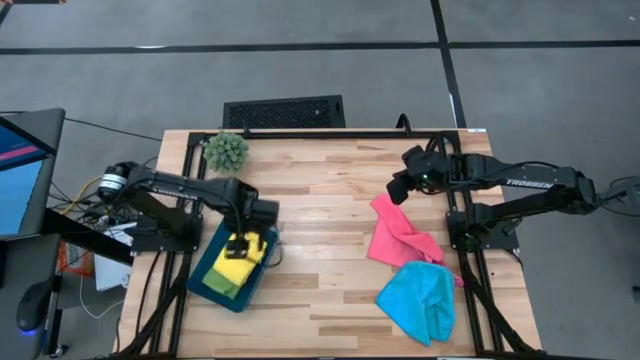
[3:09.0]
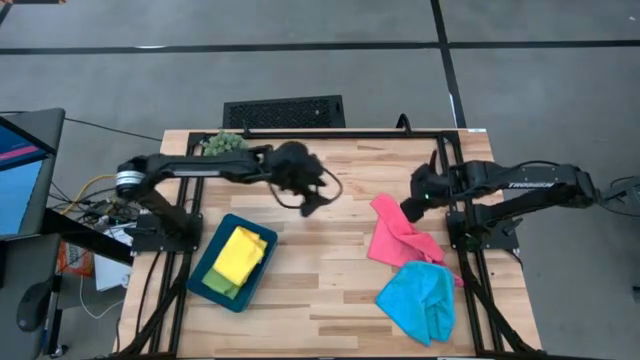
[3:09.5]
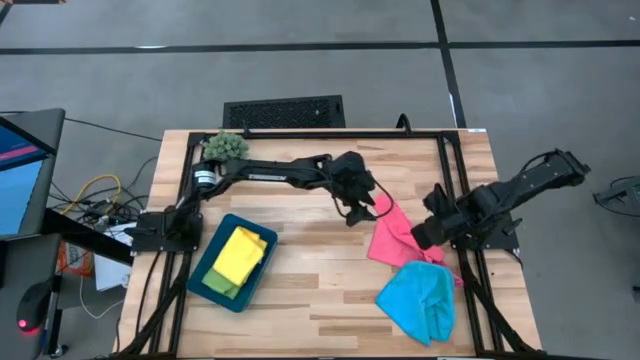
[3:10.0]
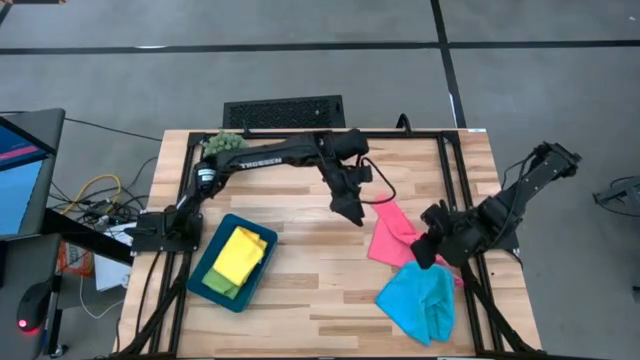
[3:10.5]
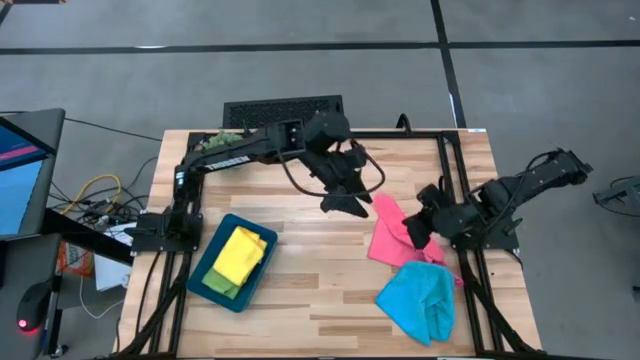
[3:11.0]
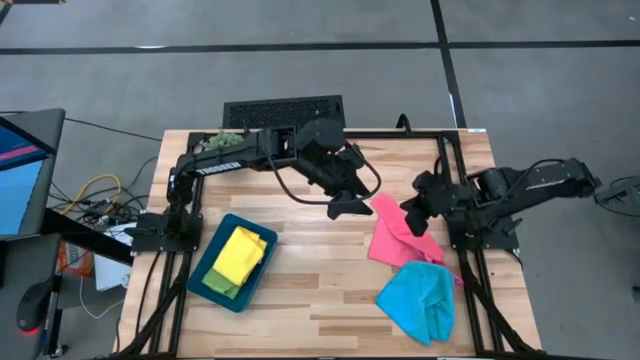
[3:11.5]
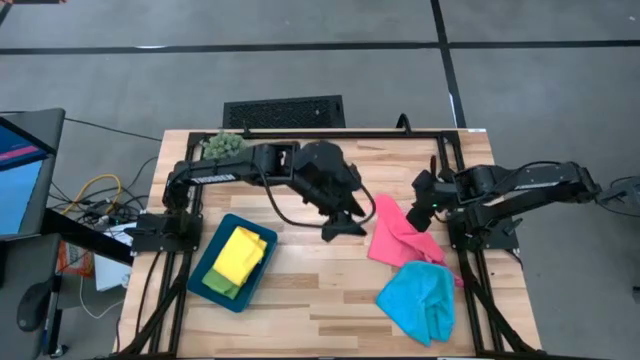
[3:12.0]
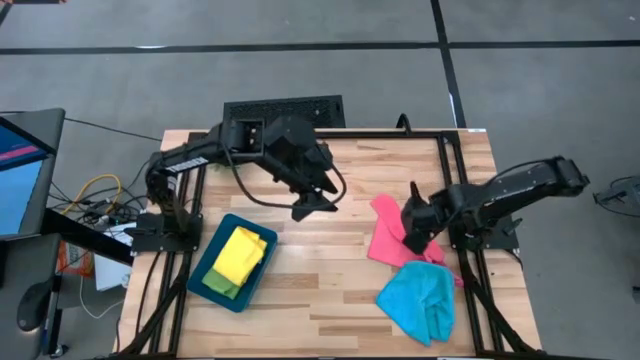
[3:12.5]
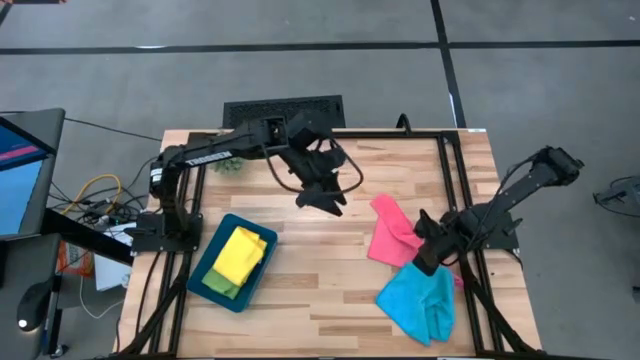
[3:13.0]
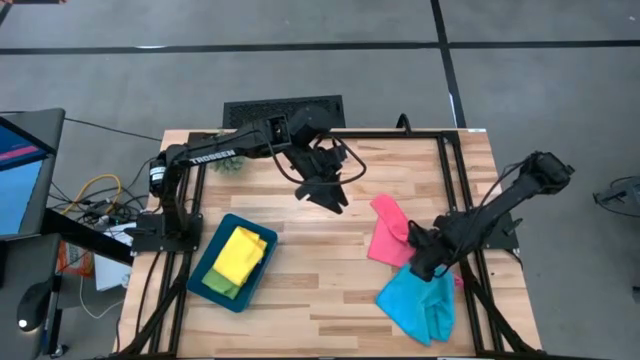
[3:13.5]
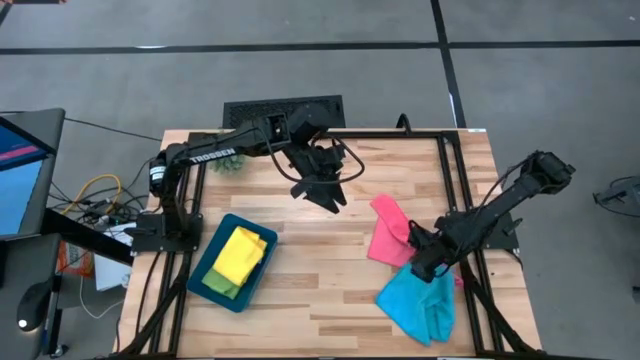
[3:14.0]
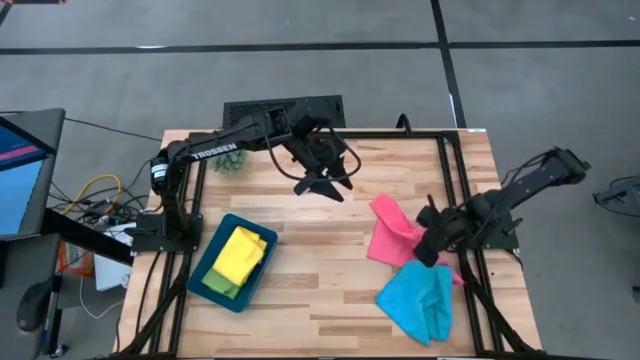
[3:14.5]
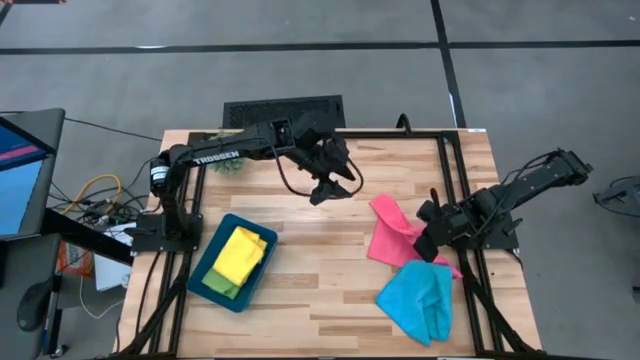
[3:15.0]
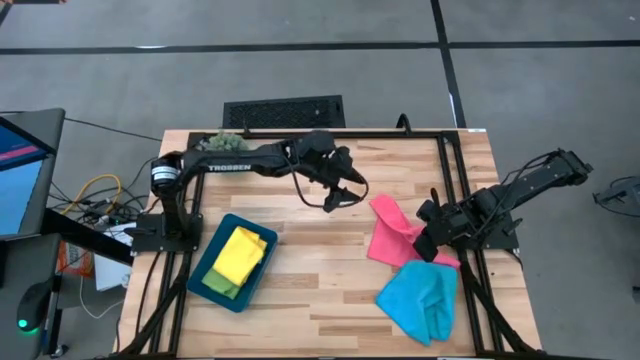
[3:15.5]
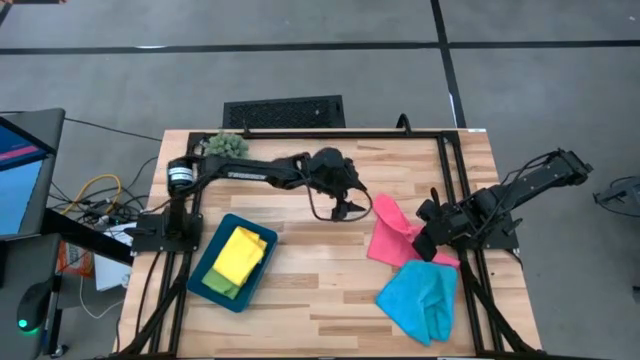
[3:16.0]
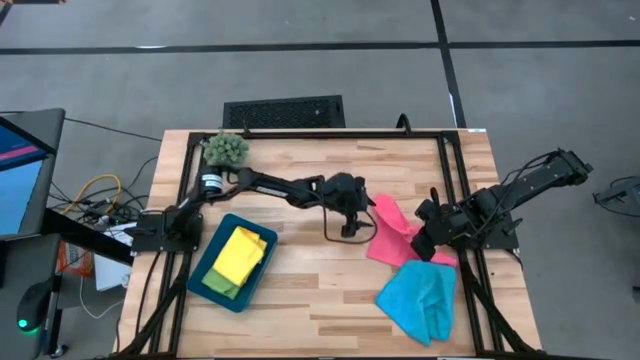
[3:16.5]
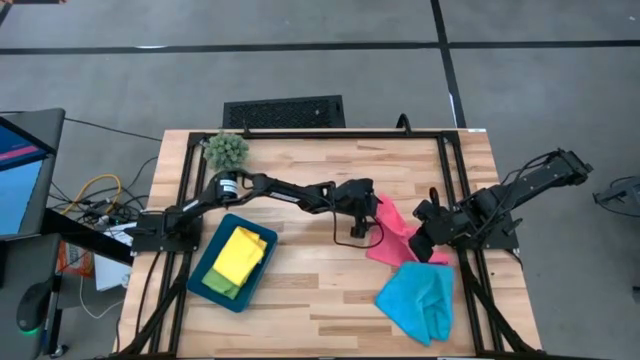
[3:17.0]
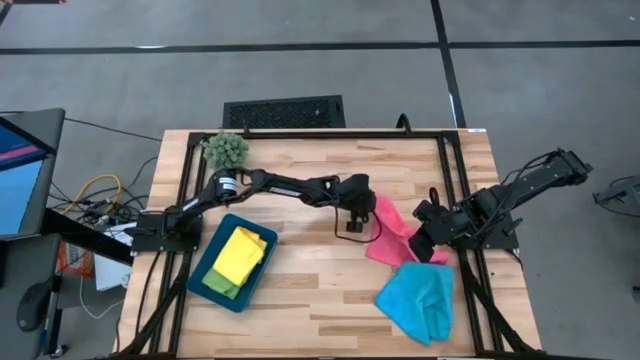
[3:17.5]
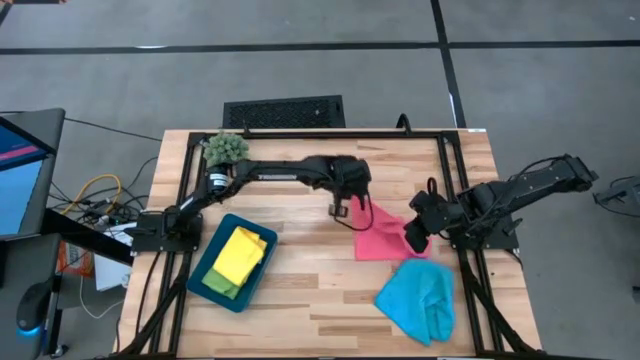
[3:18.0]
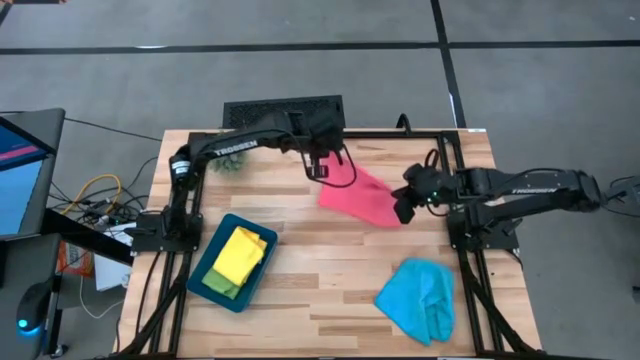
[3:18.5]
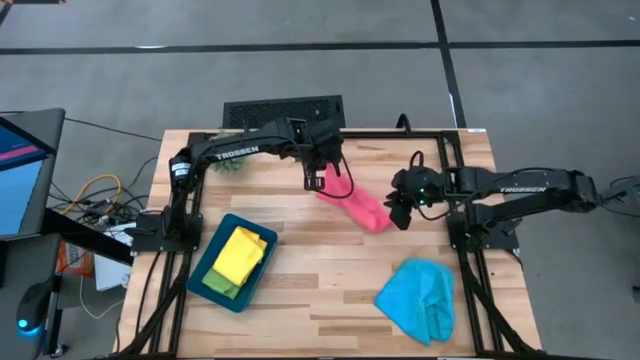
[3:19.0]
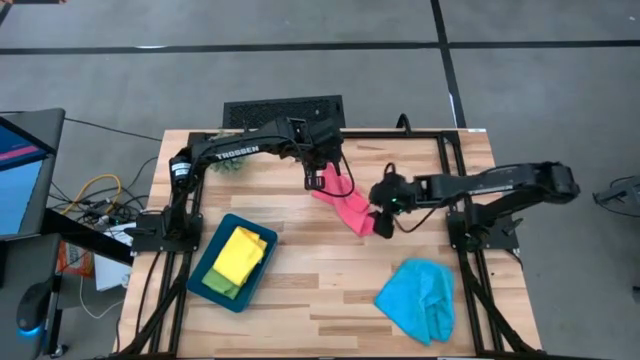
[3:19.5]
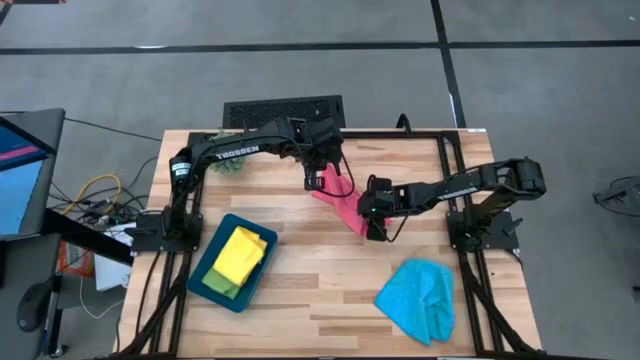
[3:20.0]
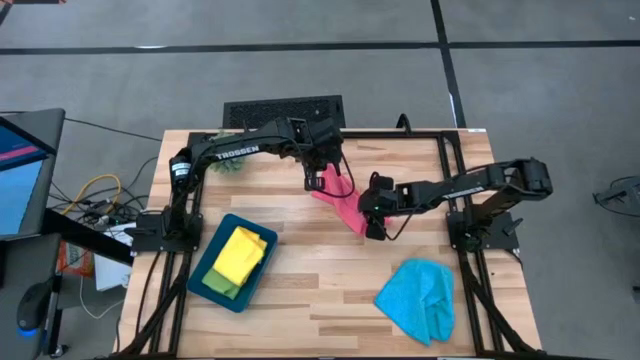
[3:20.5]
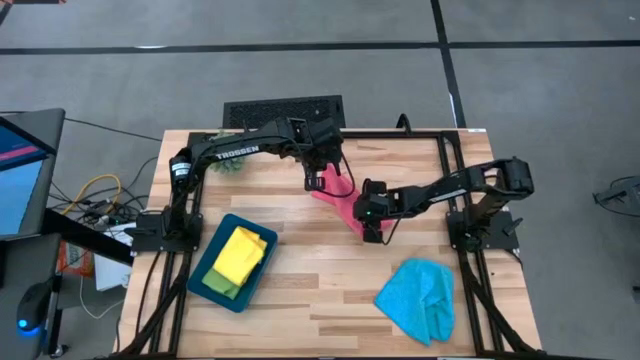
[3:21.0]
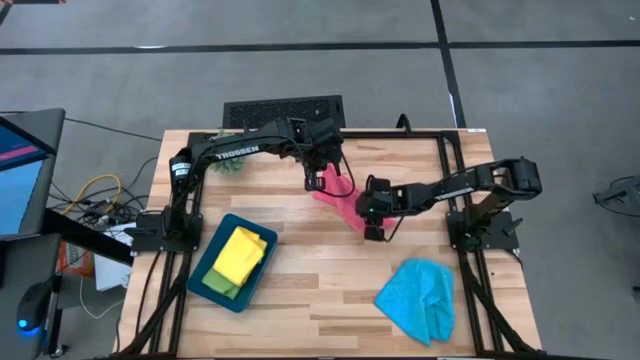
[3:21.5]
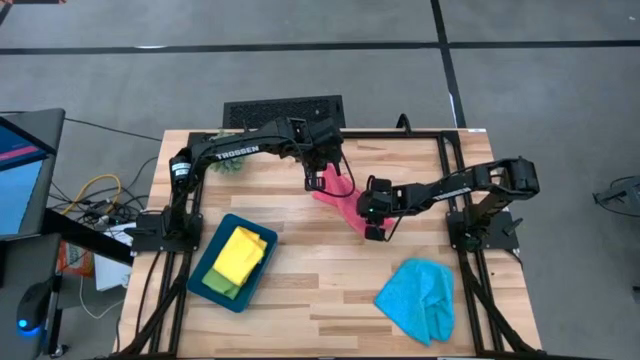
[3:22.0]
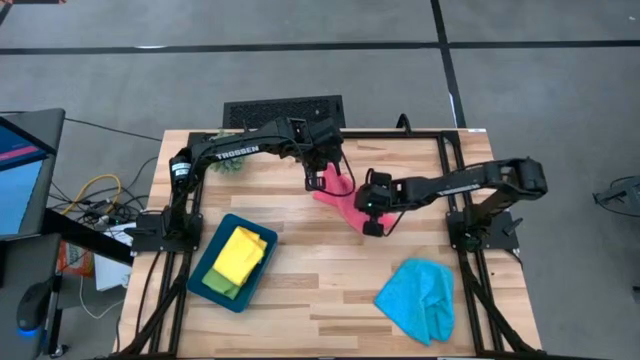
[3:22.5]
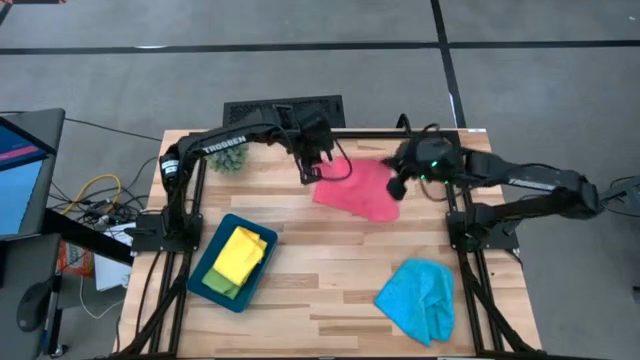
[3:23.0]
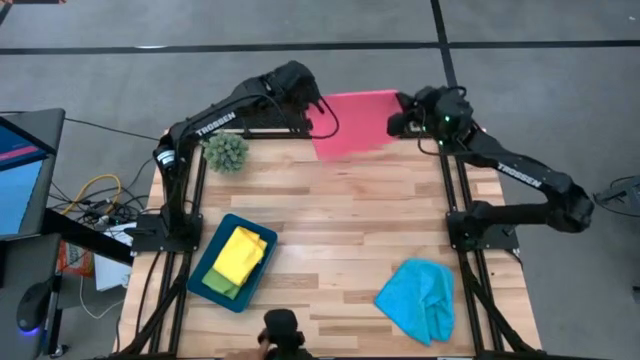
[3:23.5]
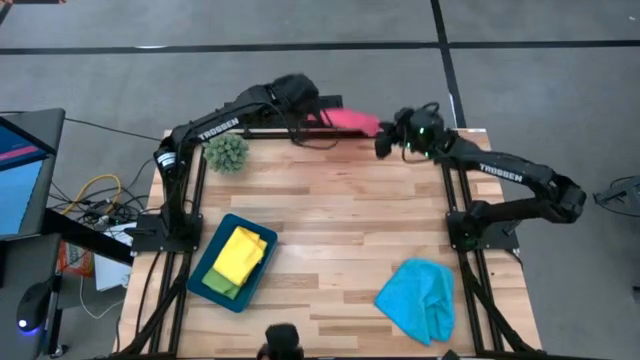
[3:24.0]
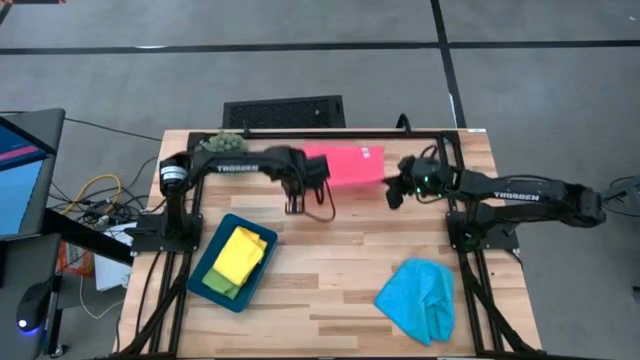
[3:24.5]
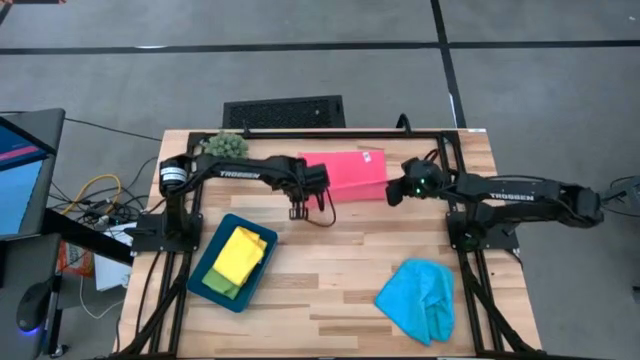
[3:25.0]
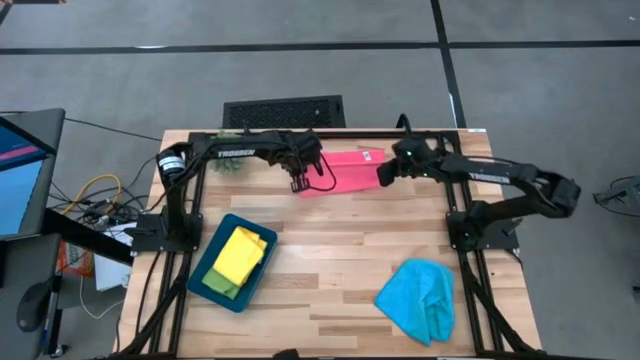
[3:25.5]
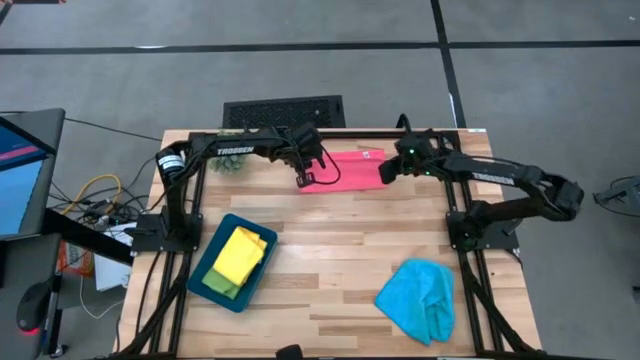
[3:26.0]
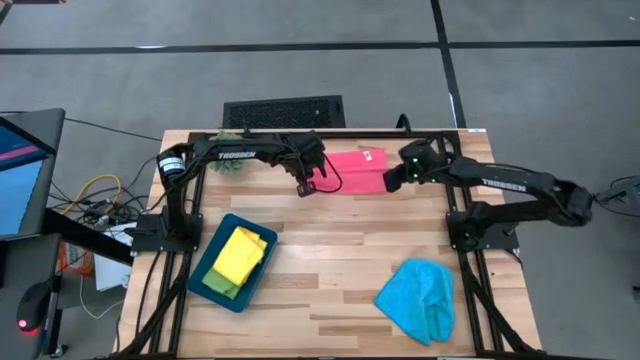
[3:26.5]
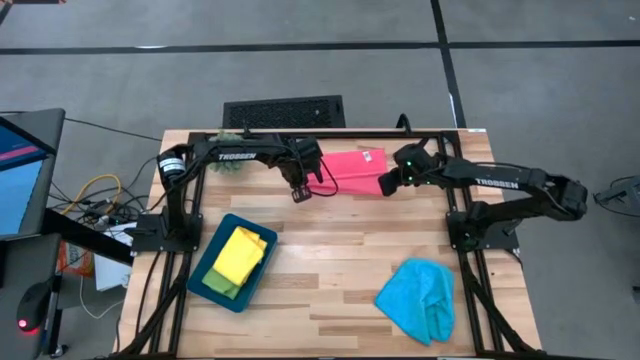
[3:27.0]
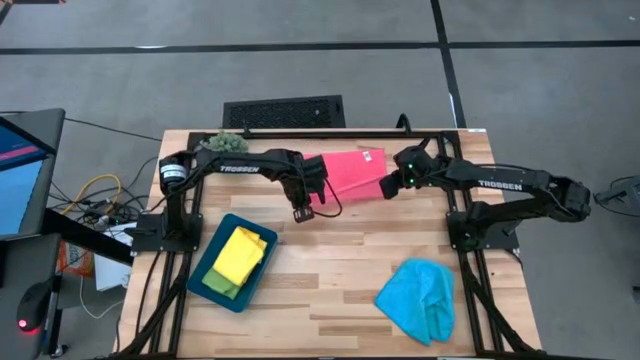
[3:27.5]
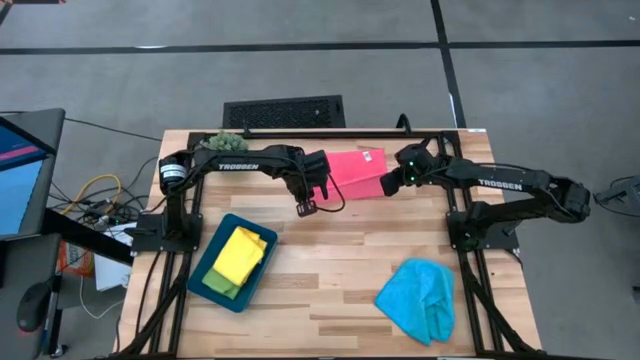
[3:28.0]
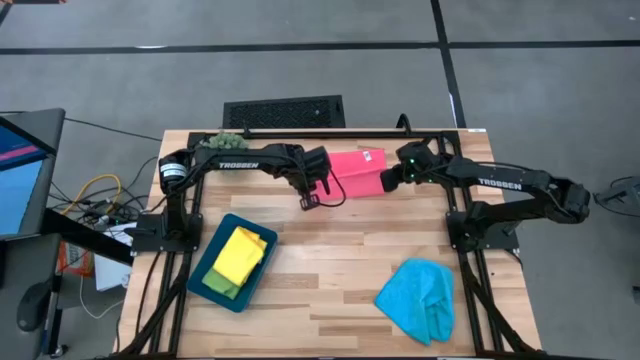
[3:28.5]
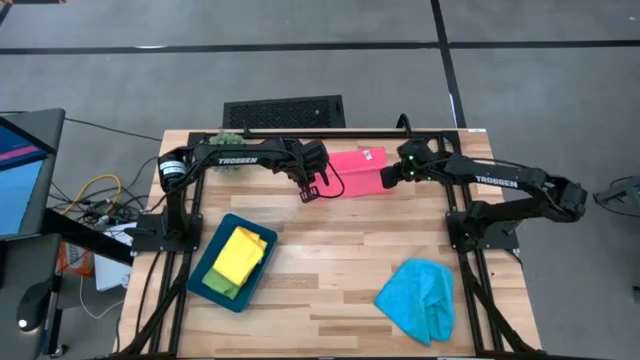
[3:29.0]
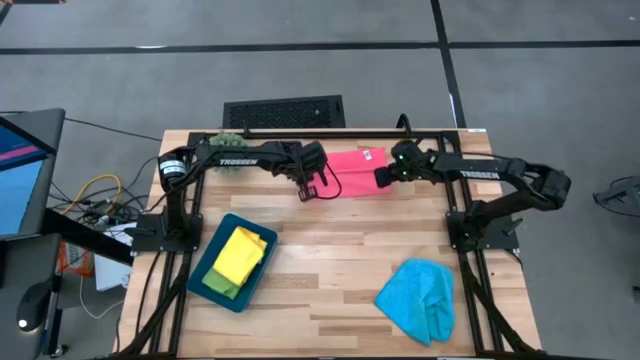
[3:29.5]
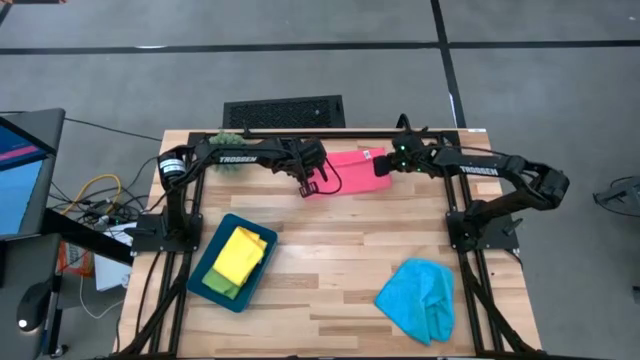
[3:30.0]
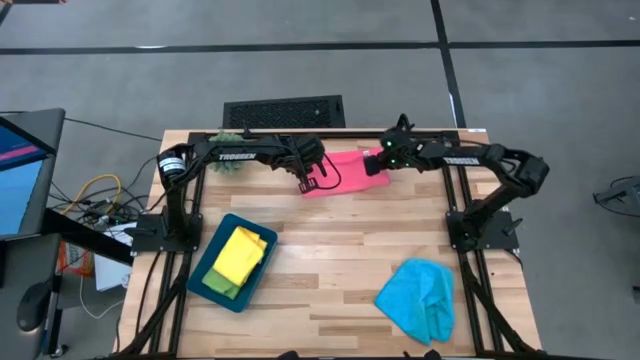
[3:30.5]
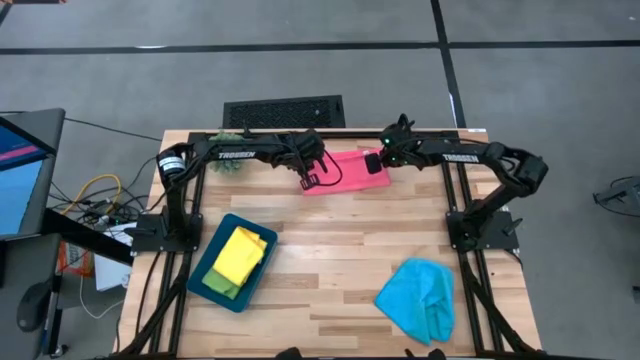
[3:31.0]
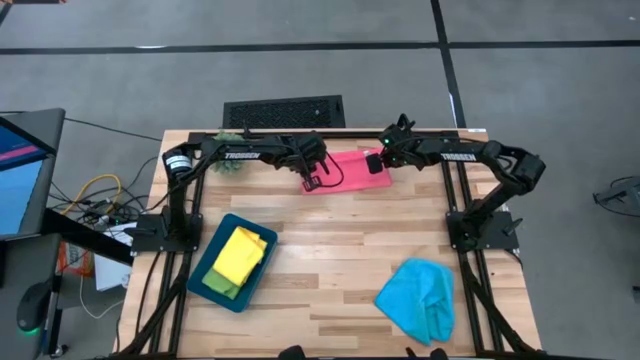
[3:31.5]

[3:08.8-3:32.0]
Task: Fold microfiber towels
Fold the pink microfiber towel
